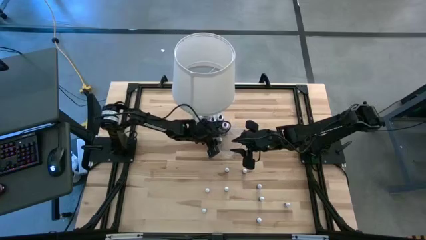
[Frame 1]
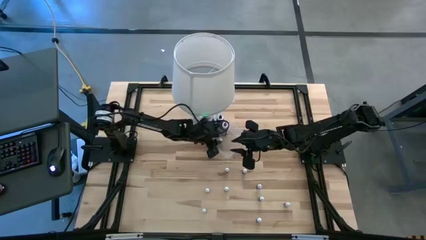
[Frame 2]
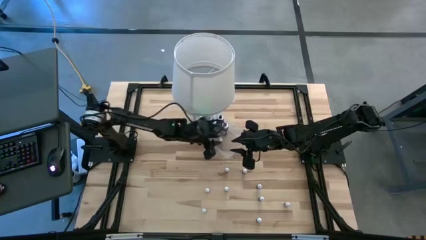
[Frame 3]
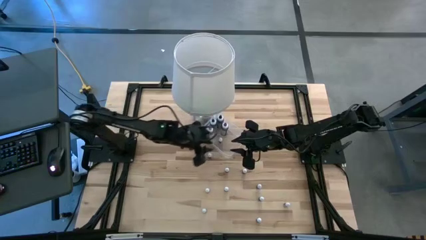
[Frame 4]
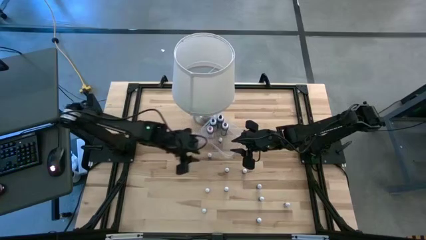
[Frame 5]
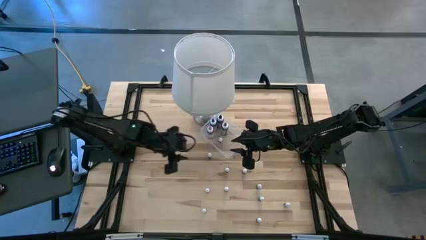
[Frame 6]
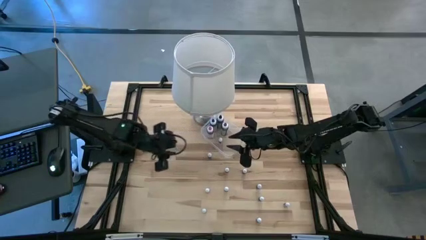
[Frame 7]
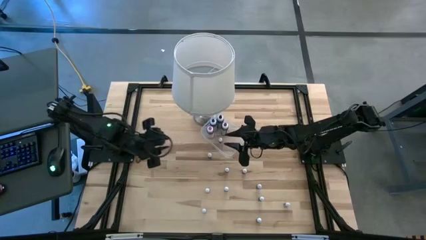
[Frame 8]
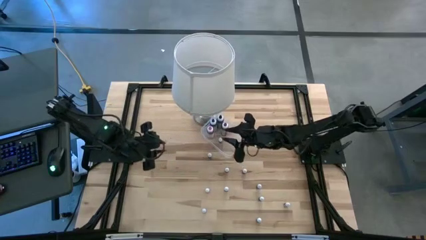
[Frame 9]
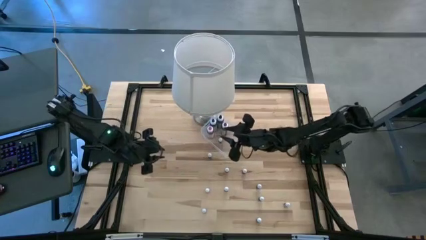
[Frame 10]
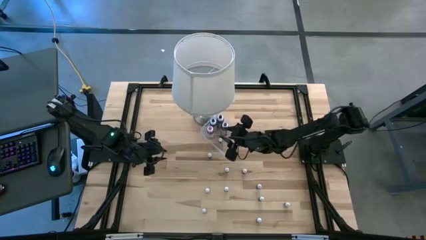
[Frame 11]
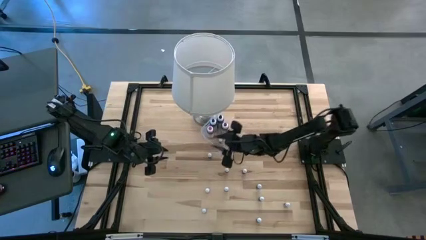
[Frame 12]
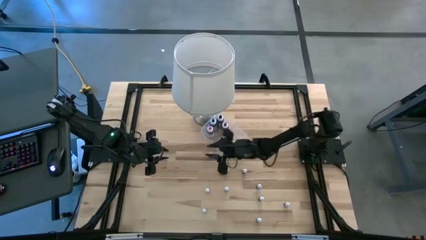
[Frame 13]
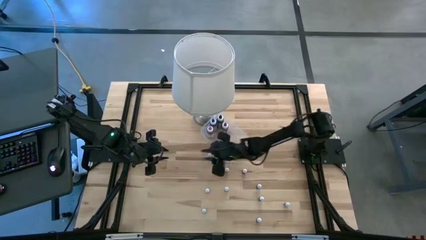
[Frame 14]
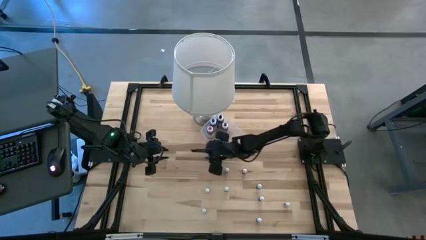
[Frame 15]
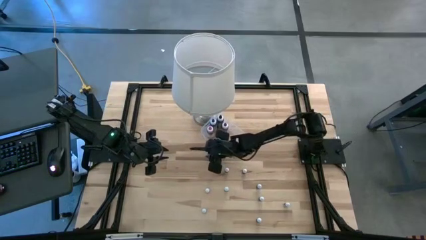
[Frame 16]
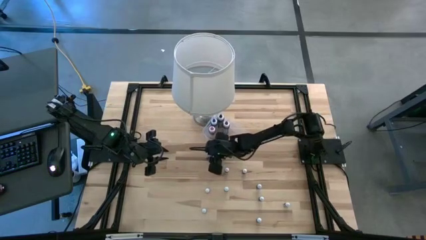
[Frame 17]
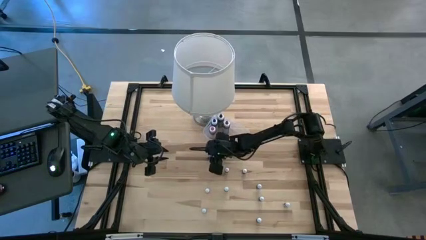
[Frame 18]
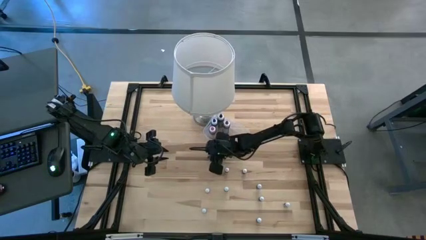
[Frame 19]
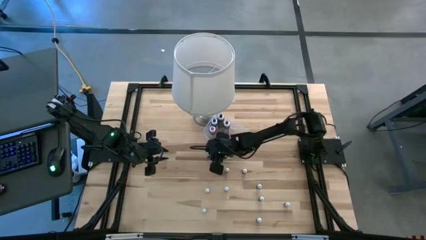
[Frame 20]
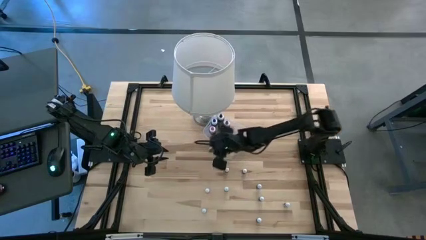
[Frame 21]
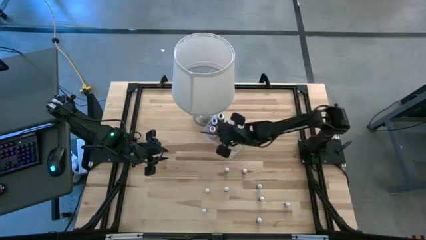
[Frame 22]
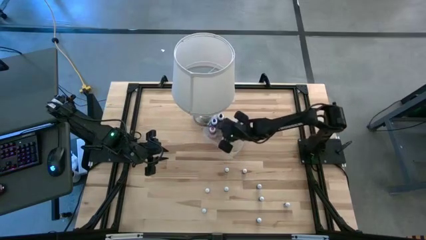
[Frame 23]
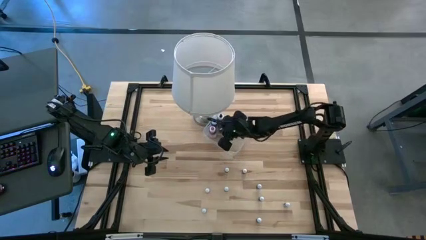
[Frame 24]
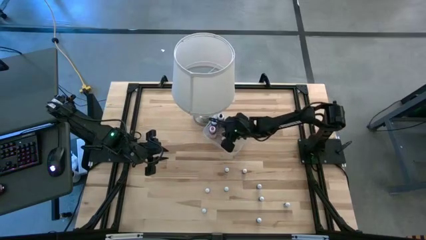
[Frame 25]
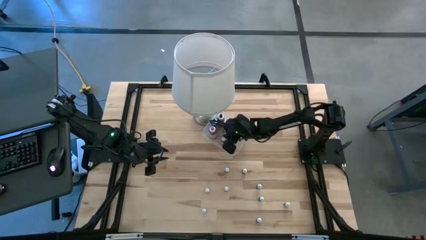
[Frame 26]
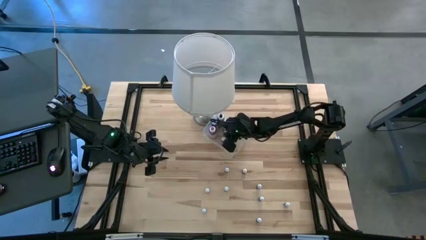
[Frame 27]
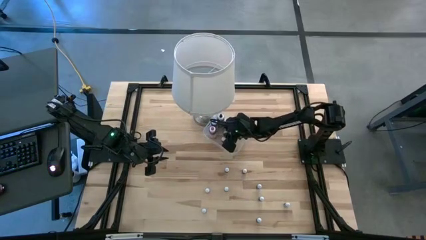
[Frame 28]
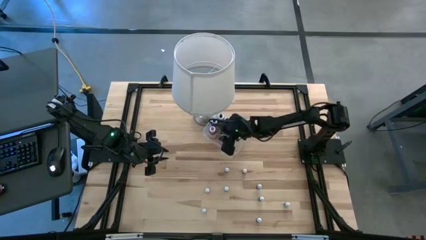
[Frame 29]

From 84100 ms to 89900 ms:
Task: Pick & Place food coloring
Put the top small black food coloring bottle into the transparent bin

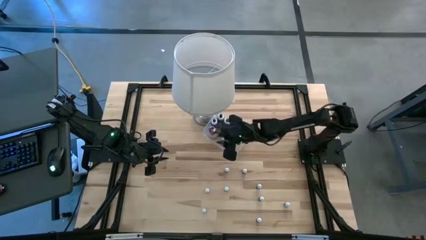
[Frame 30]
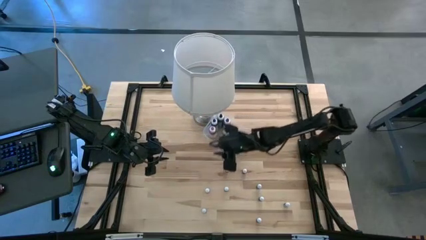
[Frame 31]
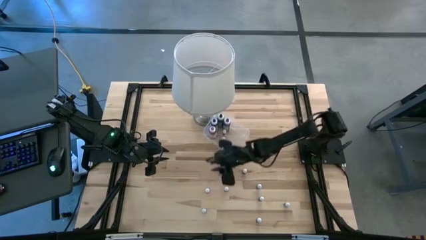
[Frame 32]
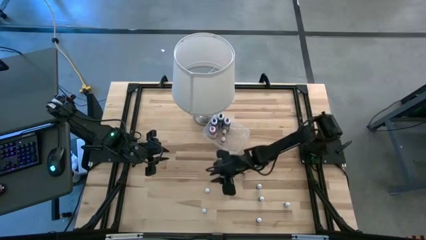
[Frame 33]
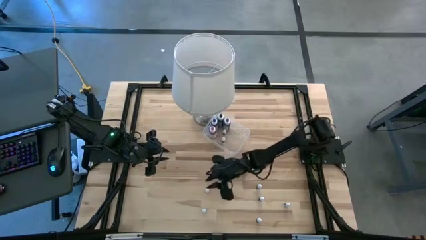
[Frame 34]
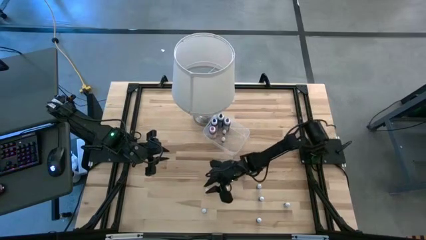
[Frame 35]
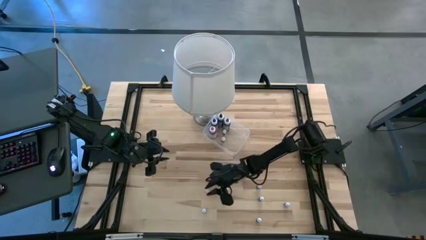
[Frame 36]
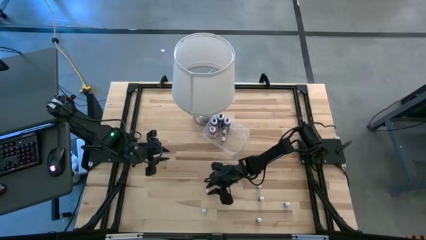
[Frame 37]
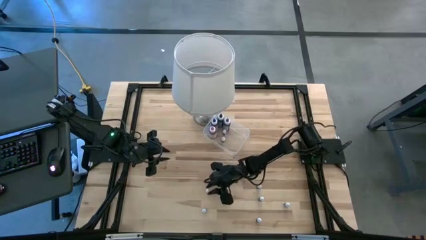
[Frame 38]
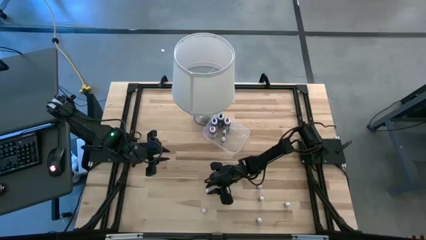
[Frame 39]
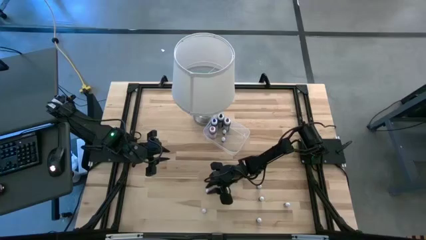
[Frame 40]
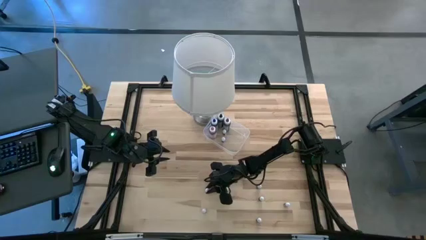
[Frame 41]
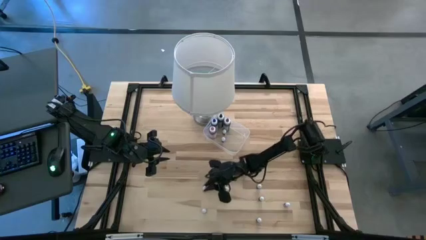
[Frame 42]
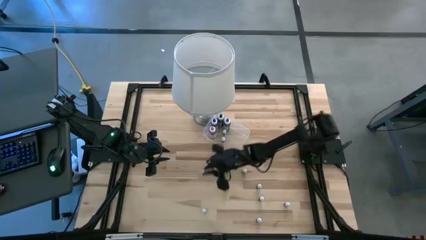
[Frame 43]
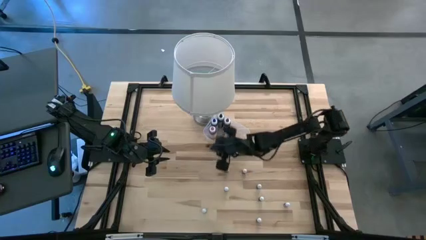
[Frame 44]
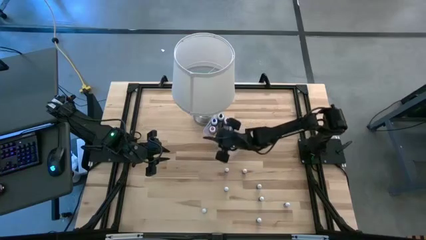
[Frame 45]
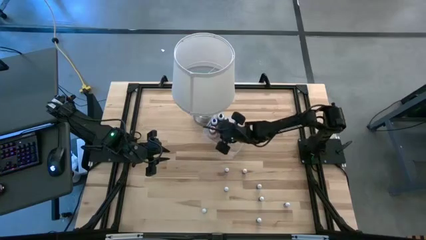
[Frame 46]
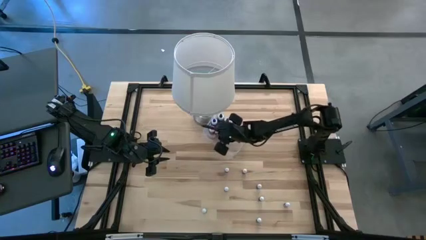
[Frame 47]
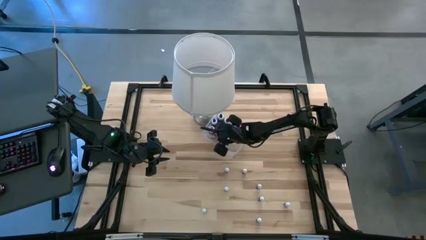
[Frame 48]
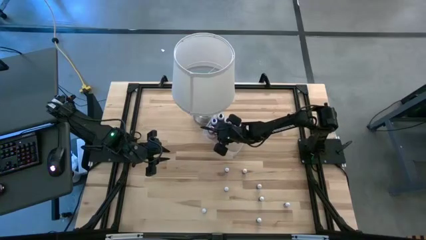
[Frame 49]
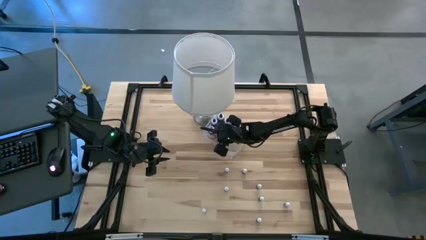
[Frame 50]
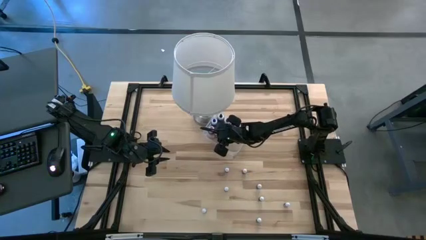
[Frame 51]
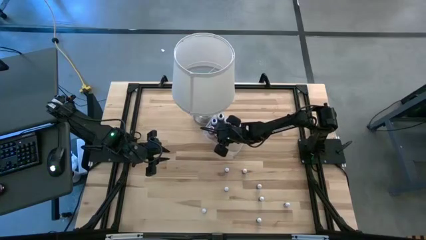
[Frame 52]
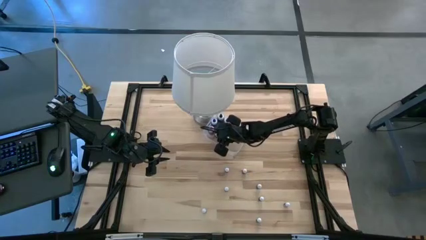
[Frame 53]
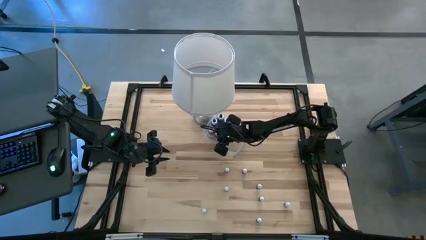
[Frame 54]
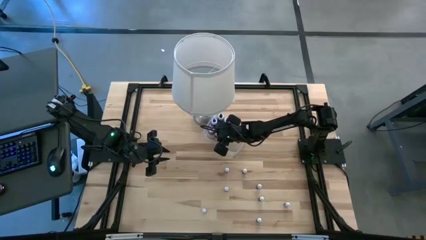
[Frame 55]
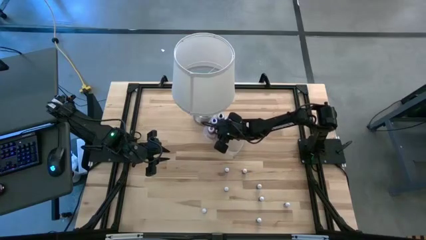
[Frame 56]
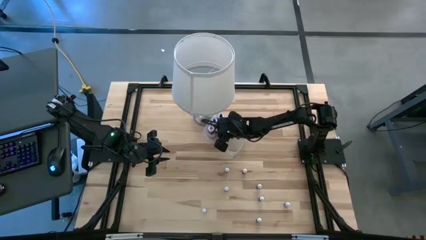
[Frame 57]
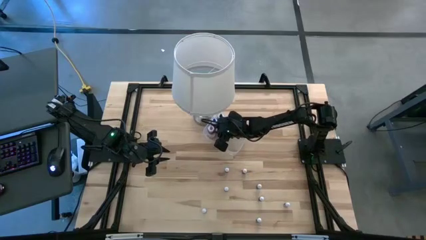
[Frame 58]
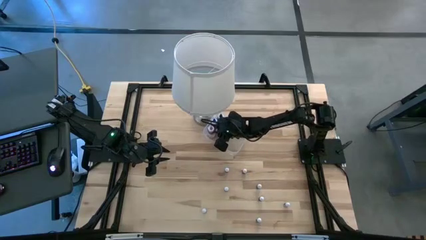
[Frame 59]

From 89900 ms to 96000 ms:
Put the small orange food coloring bottle into the transparent bin

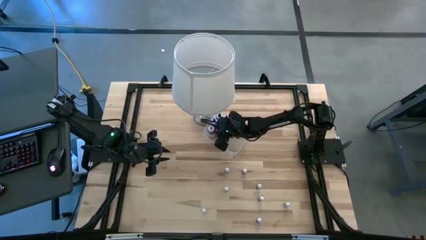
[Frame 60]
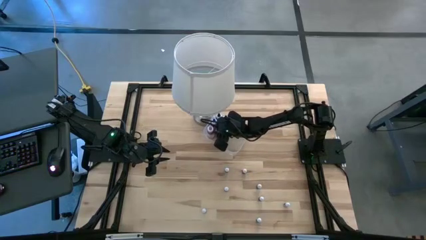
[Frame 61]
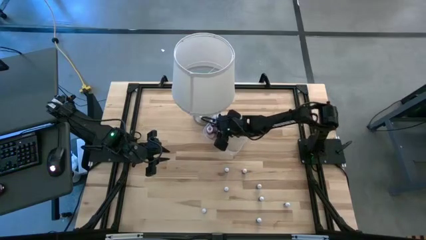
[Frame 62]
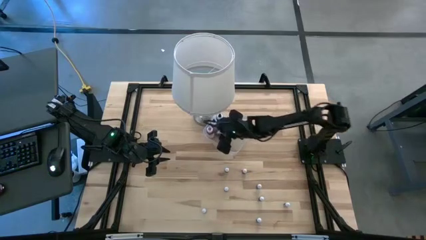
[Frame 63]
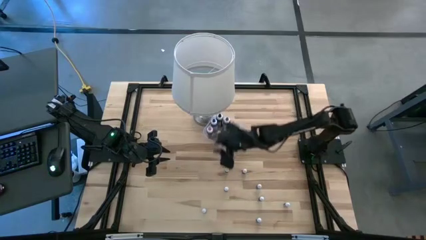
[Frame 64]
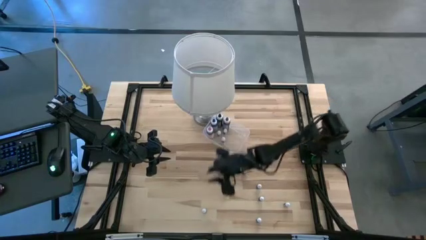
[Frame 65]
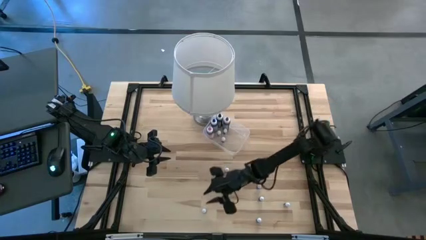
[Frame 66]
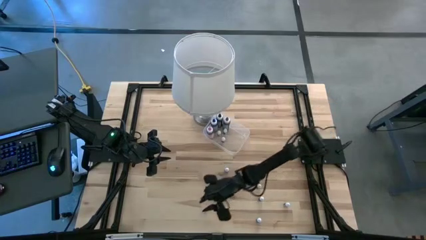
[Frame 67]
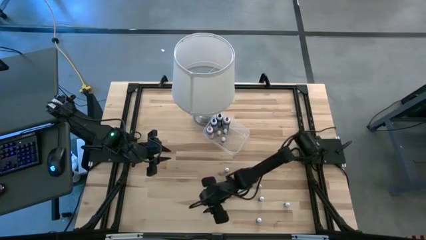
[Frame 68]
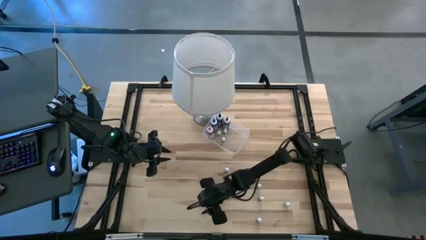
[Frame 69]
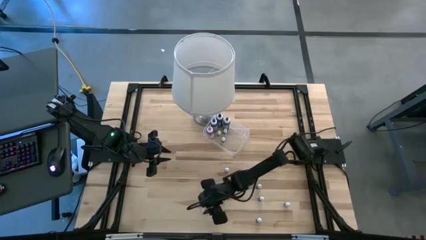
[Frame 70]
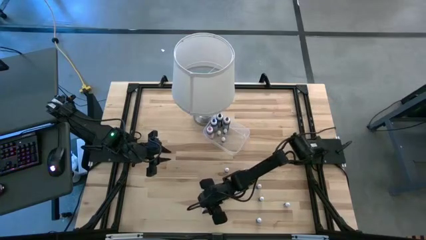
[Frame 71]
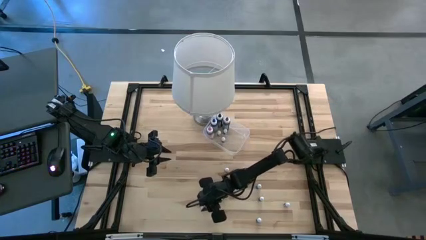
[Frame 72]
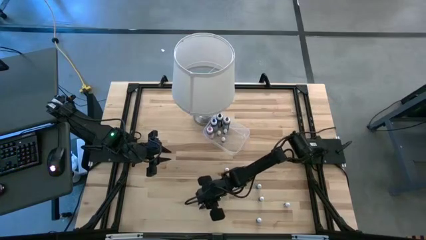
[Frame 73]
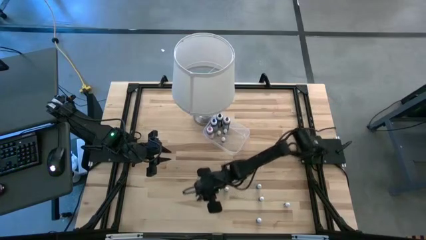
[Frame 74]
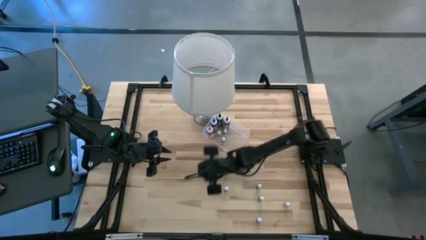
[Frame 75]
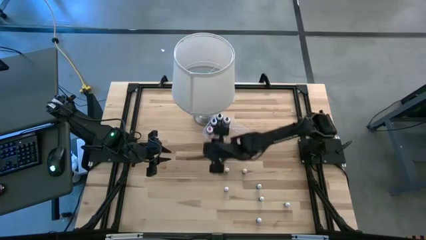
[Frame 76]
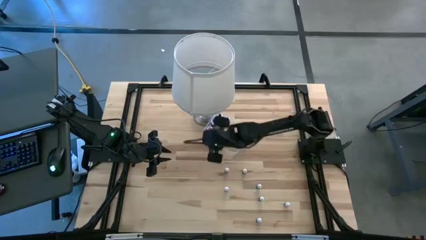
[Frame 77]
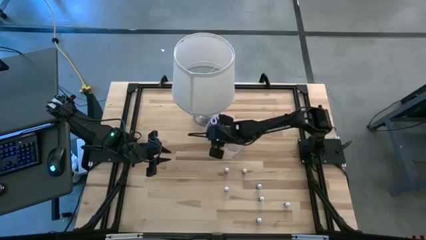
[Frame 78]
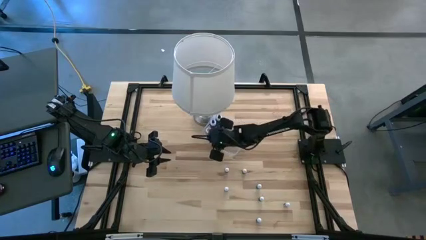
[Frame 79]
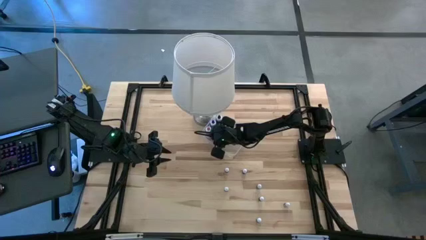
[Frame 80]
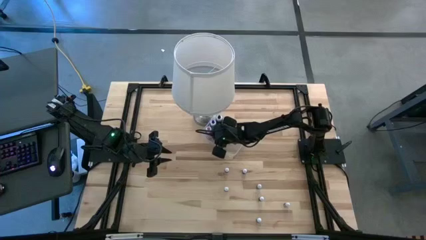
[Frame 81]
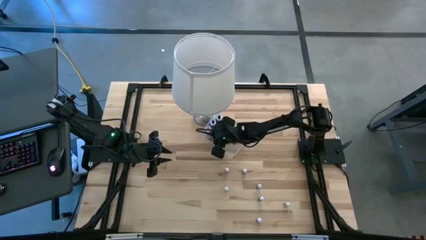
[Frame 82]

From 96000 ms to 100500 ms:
Put the small green food coloring bottle into the transparent bin
